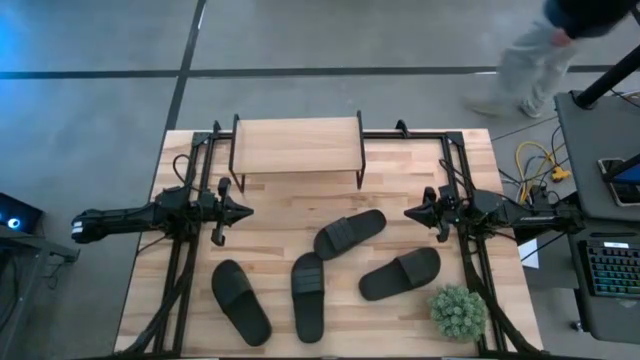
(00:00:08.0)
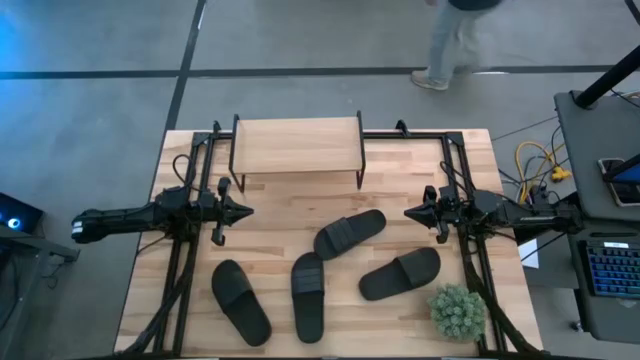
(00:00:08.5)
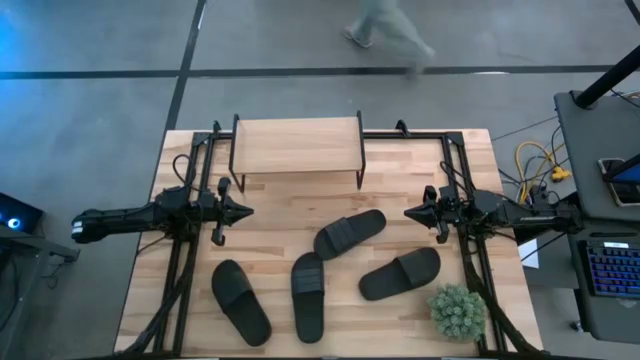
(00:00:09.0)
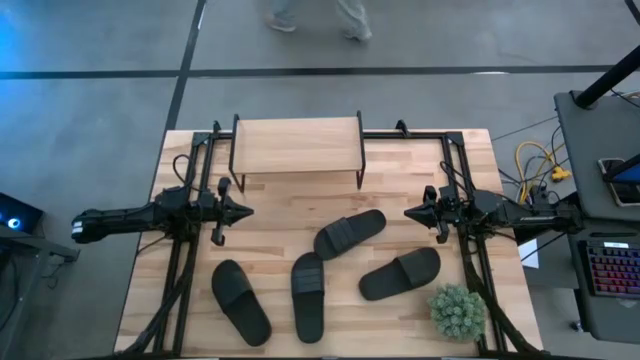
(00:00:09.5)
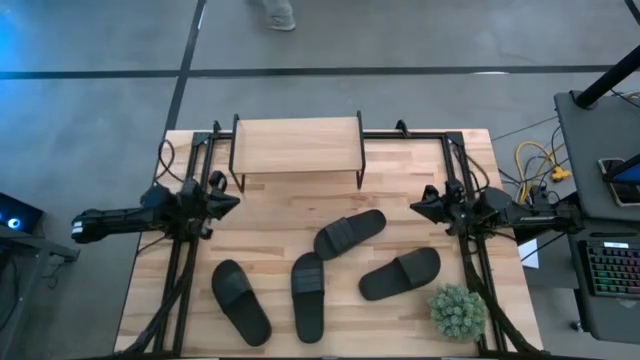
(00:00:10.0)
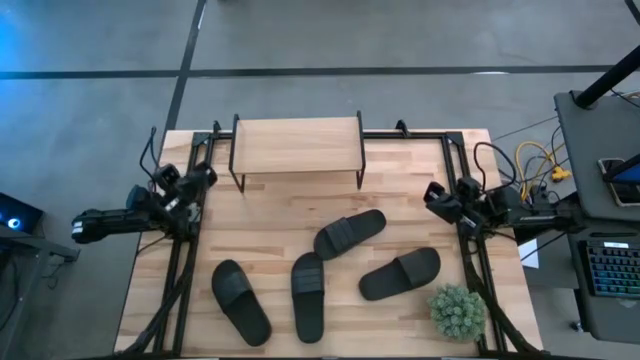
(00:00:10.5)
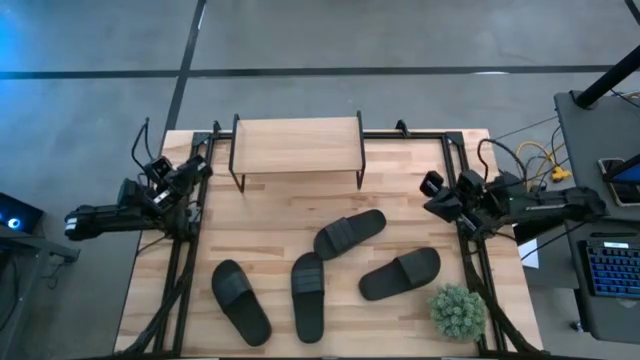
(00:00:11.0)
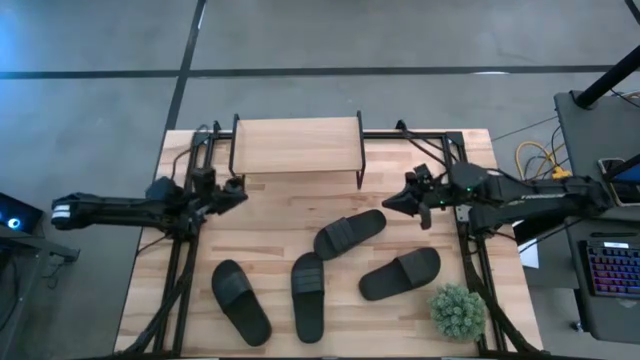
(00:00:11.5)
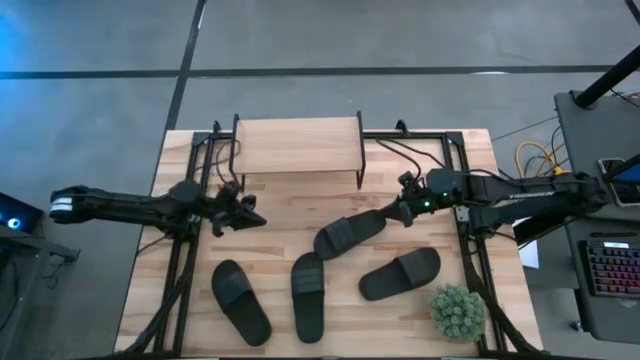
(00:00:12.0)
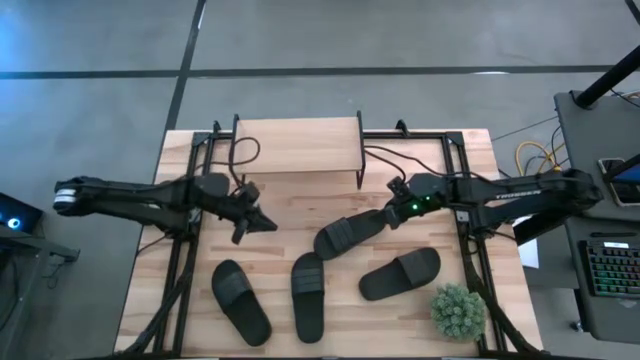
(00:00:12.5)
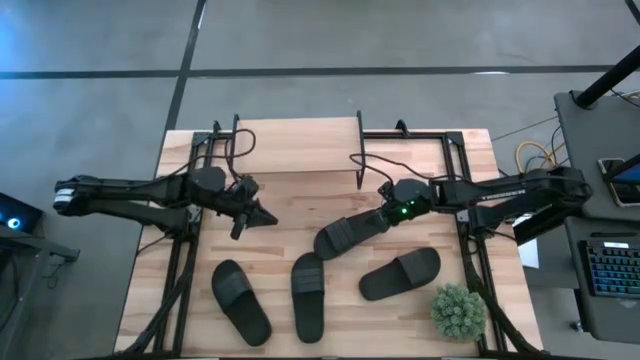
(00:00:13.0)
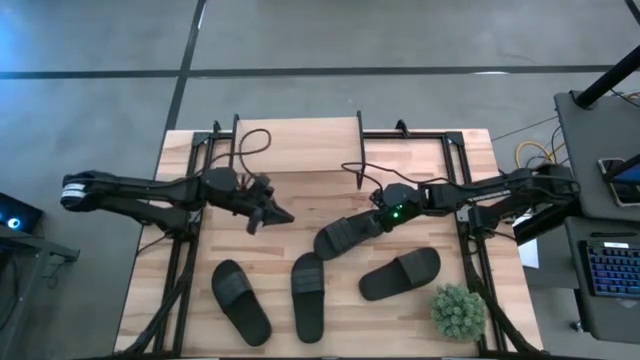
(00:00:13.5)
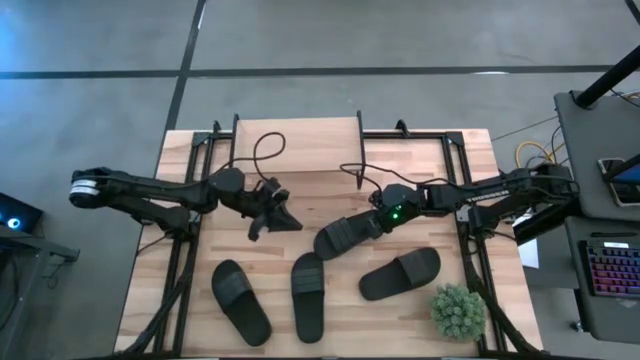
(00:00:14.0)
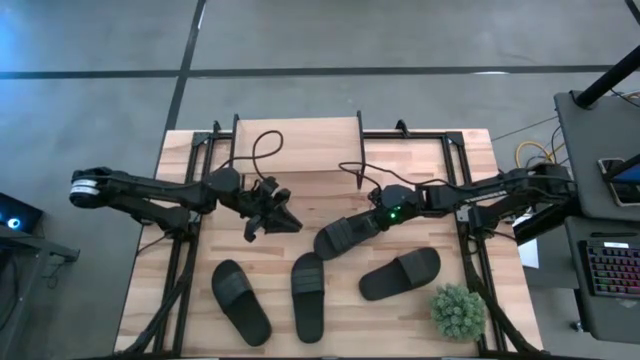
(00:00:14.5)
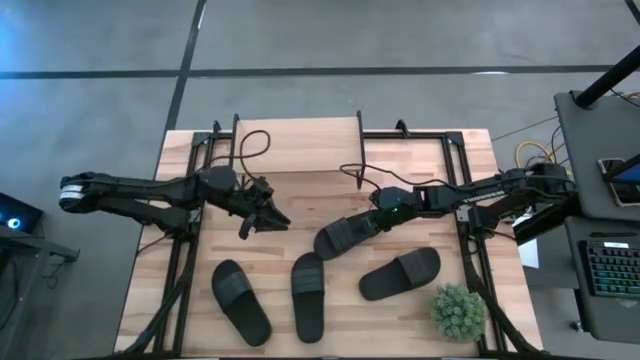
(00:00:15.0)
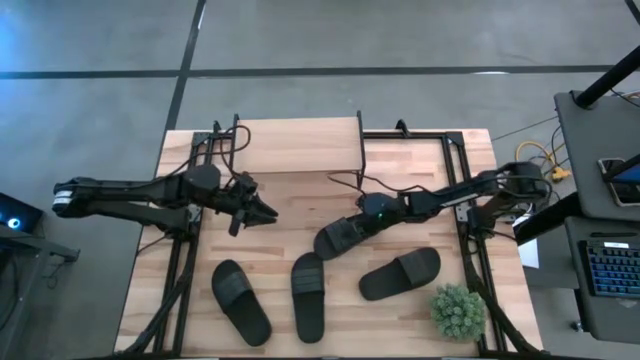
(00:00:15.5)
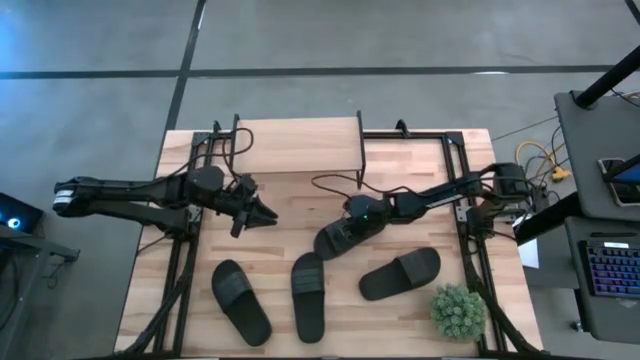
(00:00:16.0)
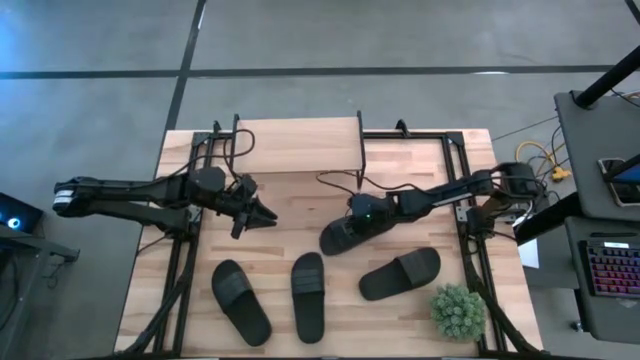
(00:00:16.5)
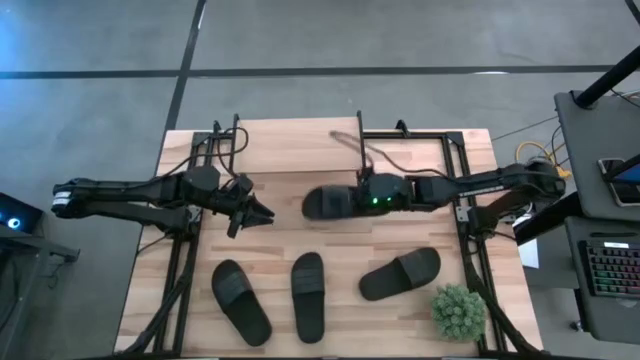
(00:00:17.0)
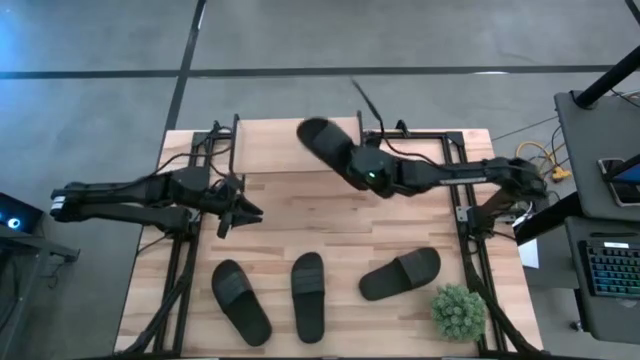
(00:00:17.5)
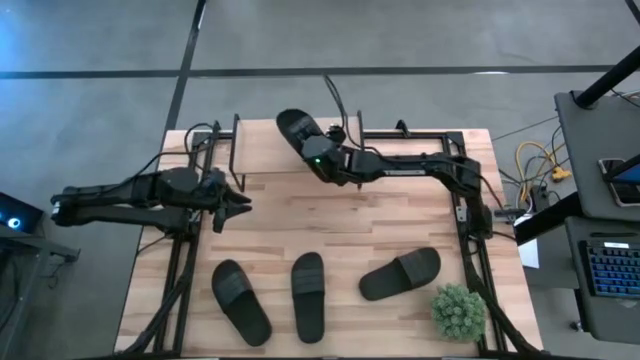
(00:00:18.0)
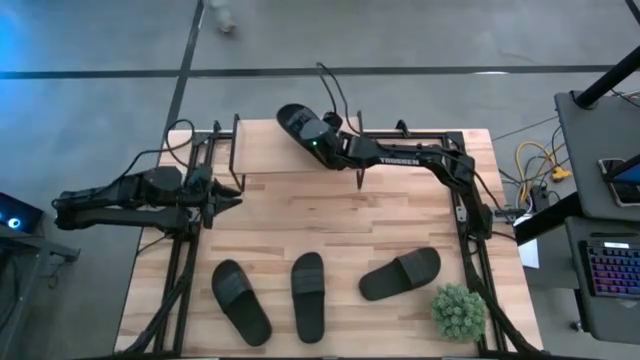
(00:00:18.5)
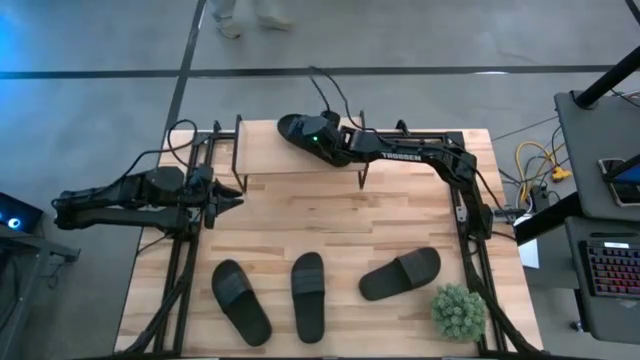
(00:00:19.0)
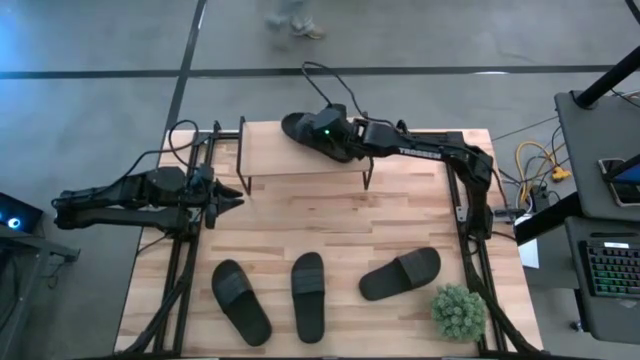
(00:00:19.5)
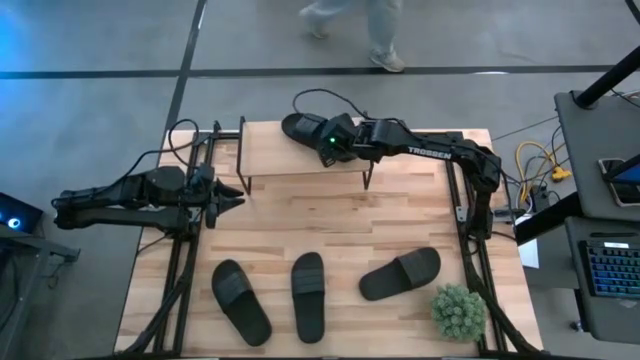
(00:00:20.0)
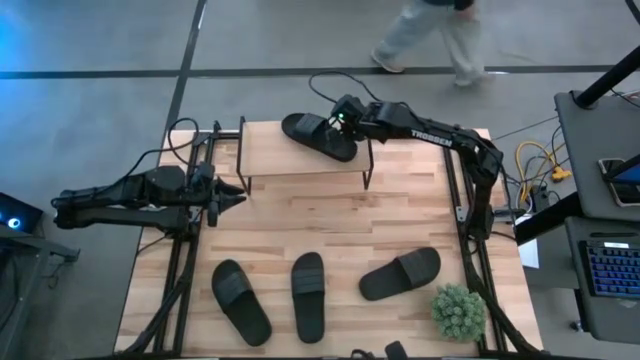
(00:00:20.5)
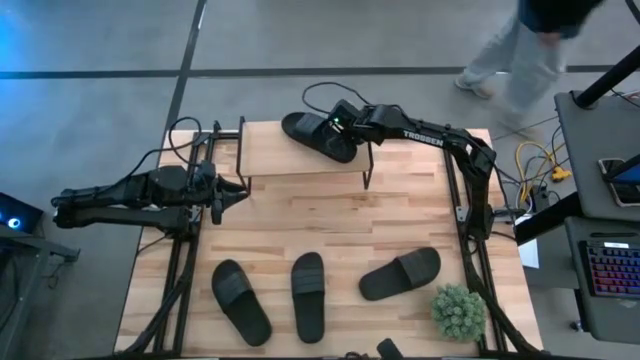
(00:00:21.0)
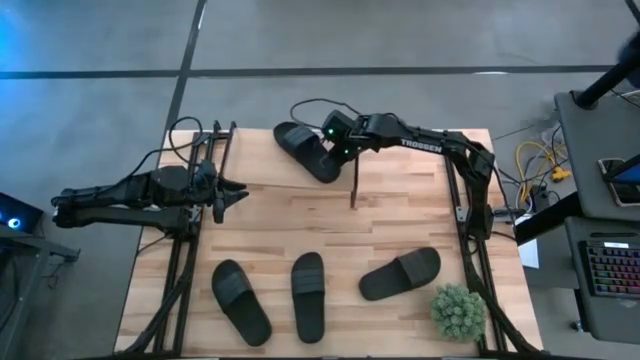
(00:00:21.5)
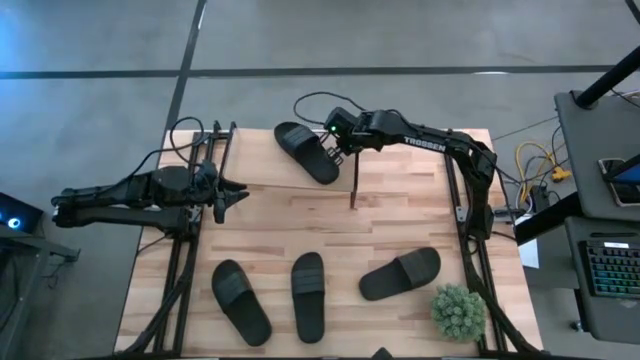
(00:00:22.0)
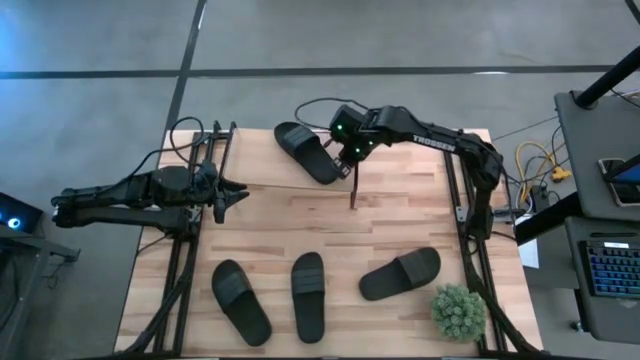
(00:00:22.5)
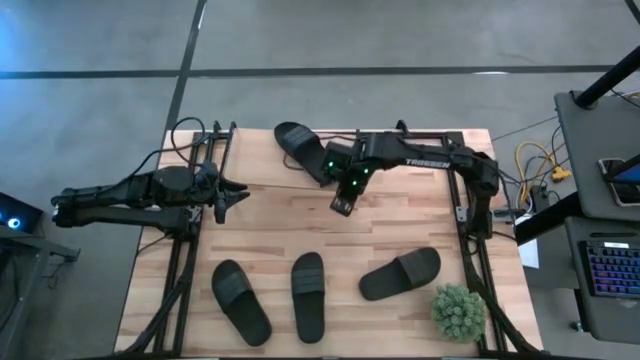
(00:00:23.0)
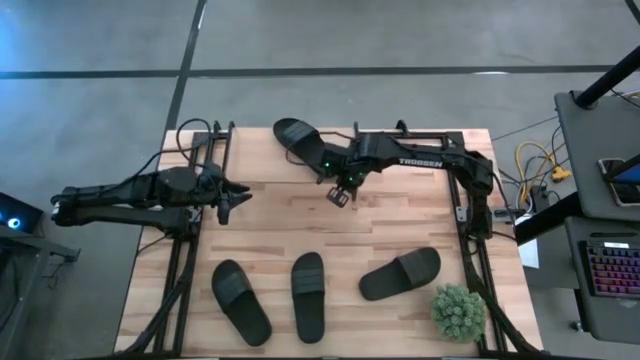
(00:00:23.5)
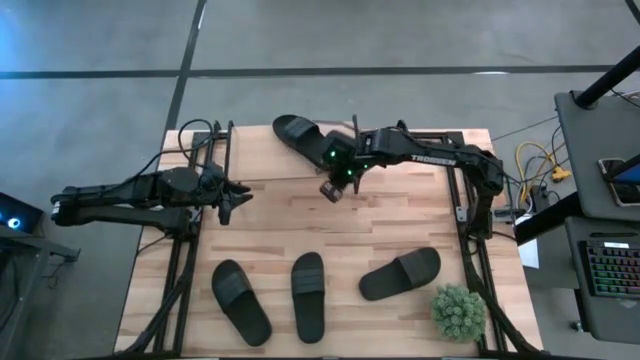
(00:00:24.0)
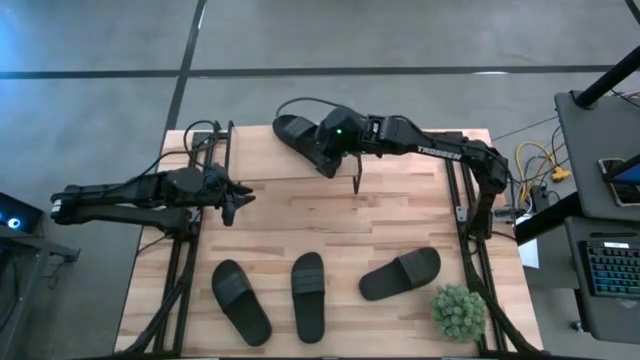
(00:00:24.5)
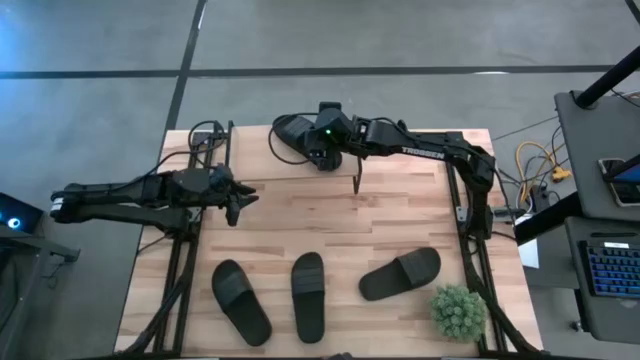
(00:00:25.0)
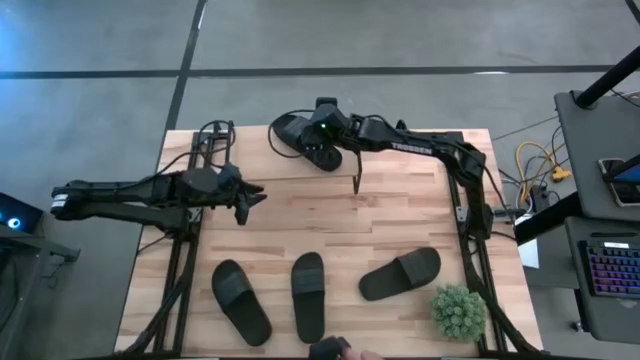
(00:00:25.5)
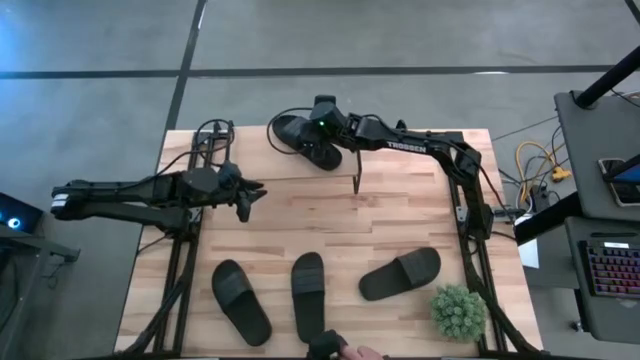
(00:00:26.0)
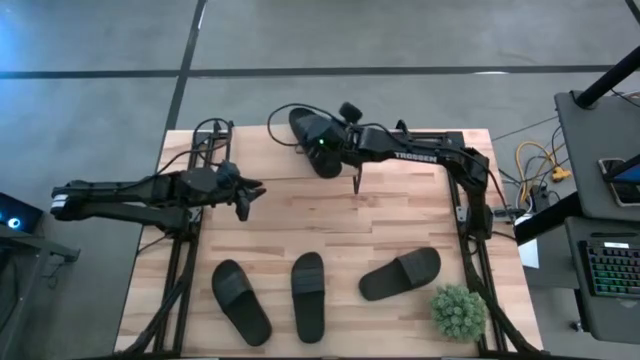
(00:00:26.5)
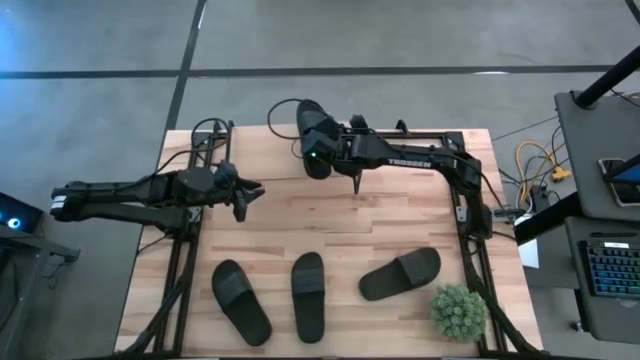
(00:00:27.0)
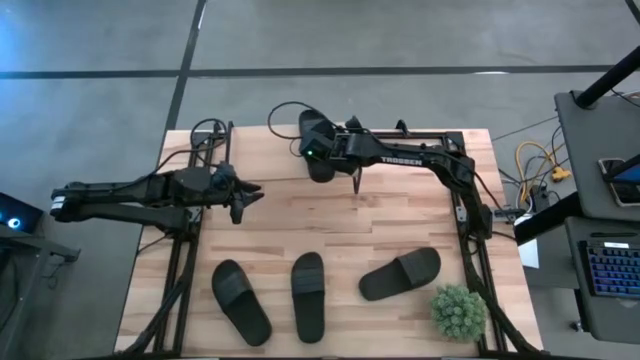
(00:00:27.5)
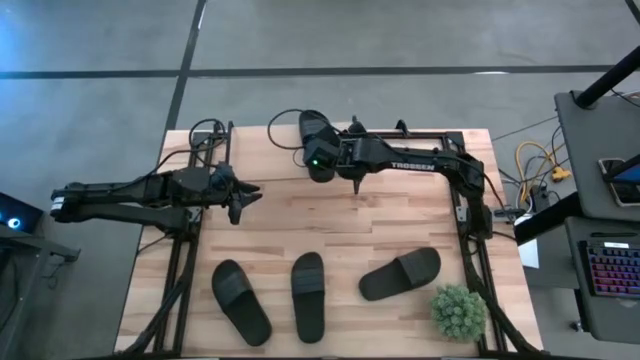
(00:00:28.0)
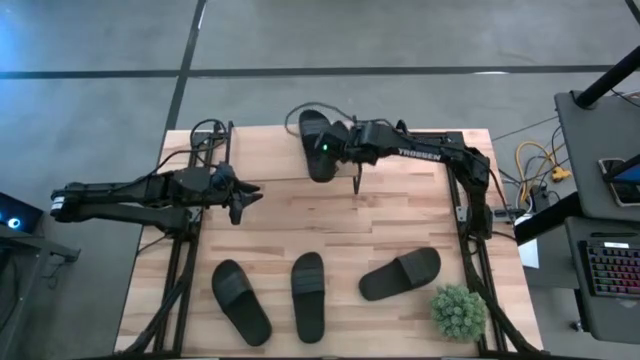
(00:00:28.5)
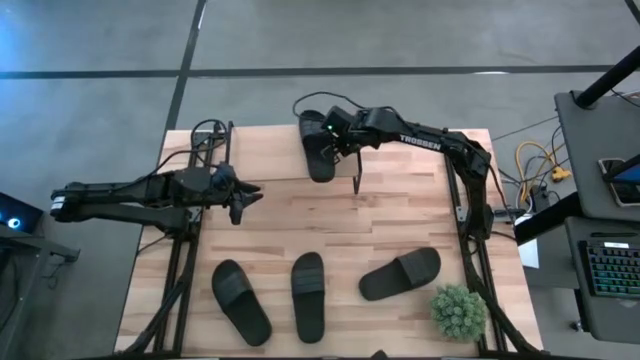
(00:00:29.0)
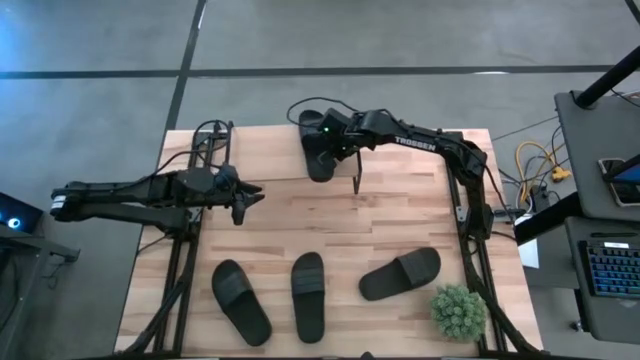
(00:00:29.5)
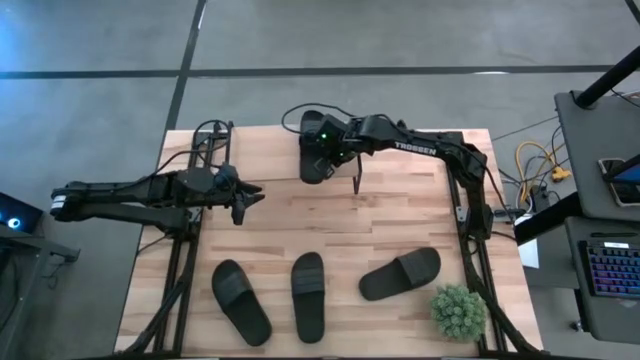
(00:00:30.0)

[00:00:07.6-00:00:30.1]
Task: Pick and place slides into the shelf
Put the top small black slide on the shelf
